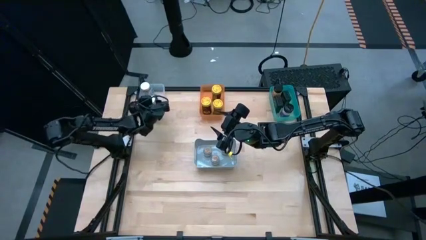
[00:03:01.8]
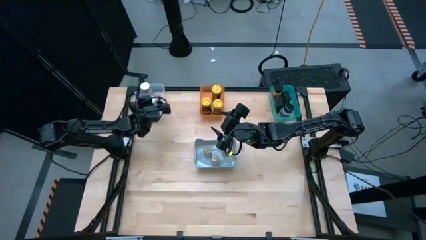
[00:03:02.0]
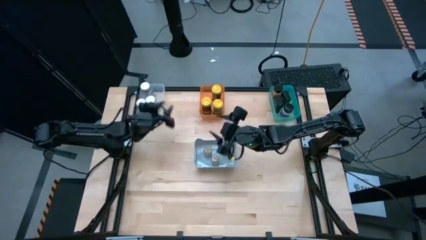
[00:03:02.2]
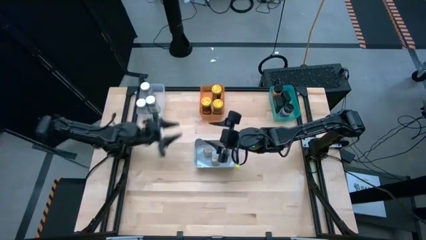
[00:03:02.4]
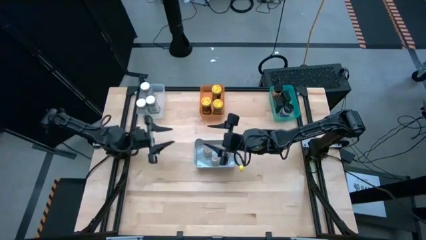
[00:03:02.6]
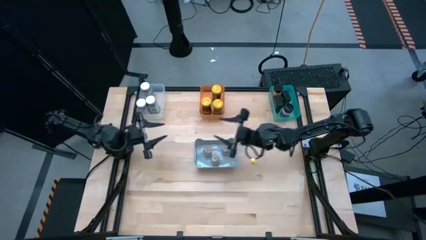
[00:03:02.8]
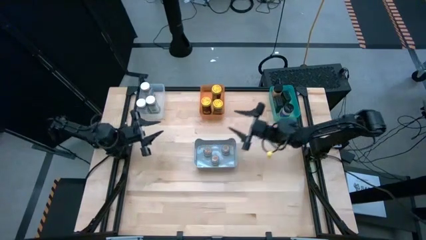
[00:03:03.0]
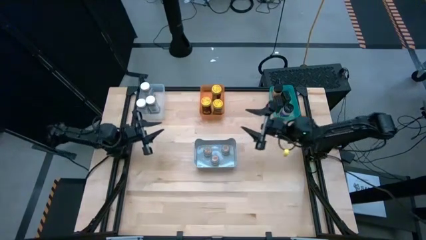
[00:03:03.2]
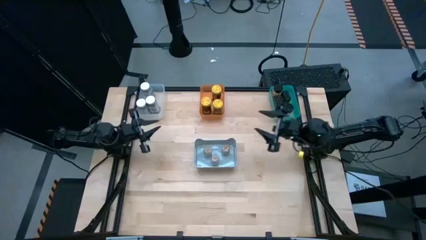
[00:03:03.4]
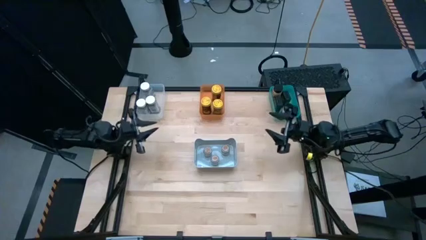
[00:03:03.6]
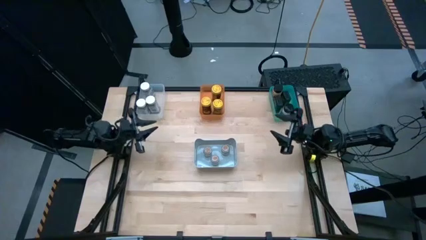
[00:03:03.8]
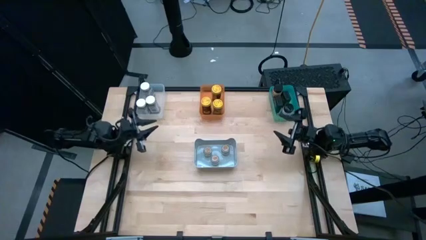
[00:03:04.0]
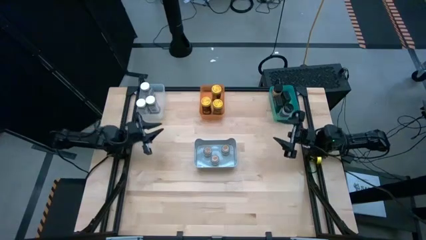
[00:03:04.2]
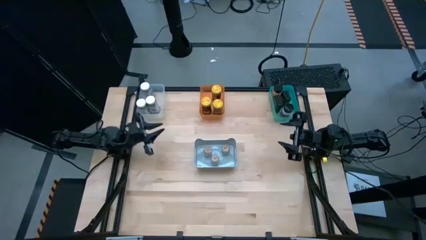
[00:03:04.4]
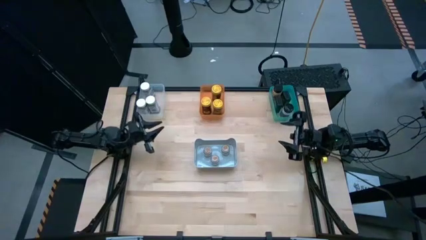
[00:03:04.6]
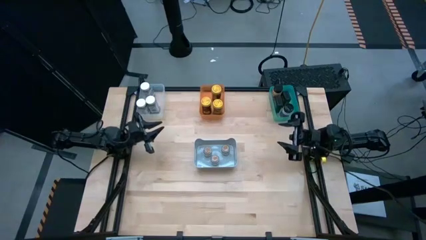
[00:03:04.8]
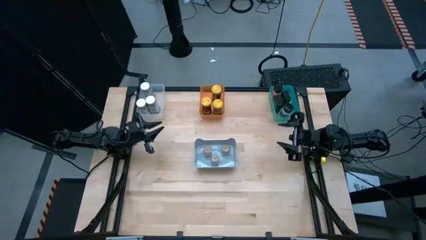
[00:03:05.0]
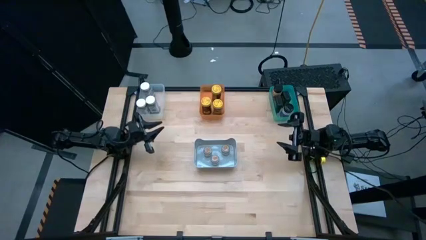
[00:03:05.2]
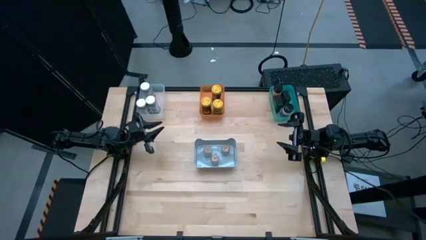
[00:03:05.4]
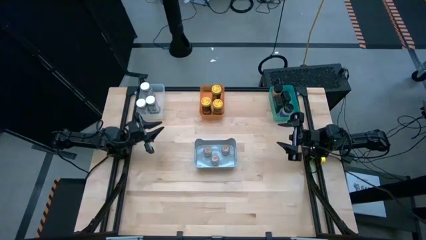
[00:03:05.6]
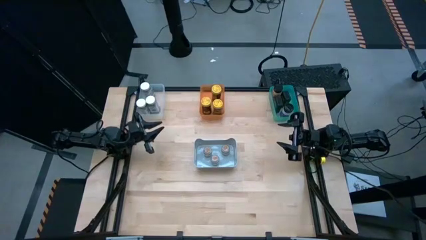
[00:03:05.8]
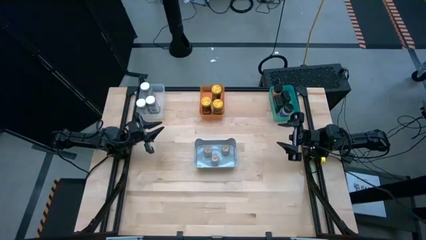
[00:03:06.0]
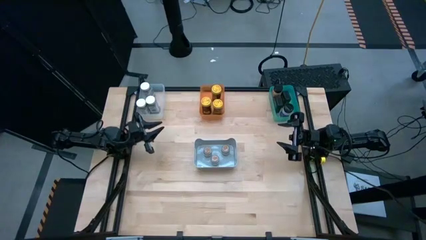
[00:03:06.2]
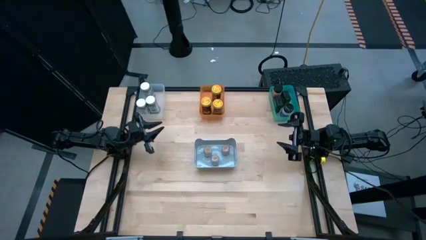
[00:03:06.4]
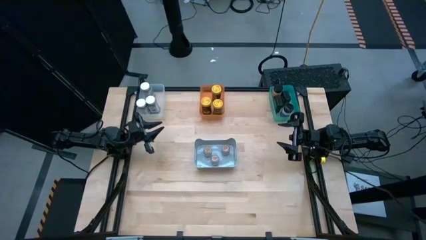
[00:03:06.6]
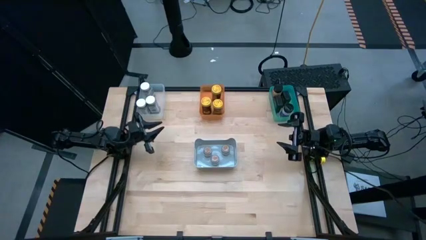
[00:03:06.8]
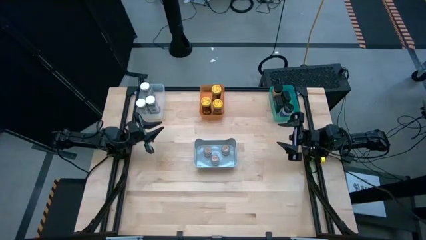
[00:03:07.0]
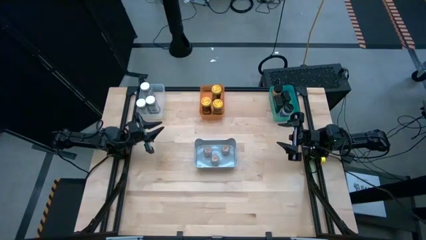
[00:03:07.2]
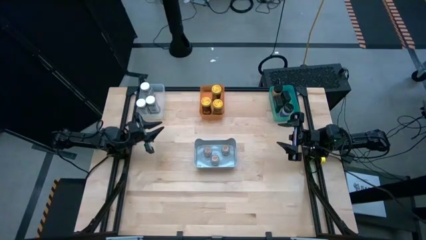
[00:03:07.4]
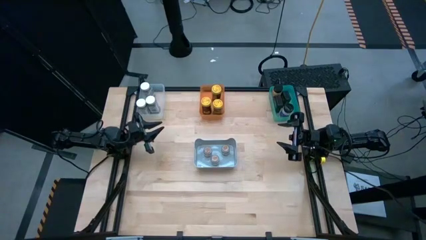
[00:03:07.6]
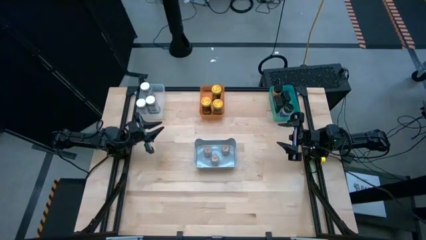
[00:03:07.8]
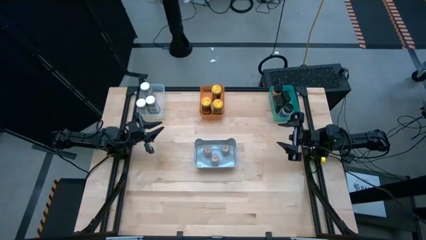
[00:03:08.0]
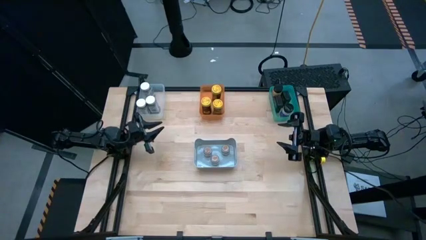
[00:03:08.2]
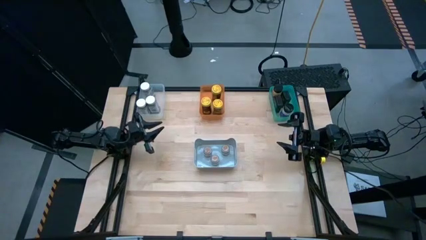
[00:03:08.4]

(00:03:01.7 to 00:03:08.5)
Task: Sort spices by type
Return to Home Position
